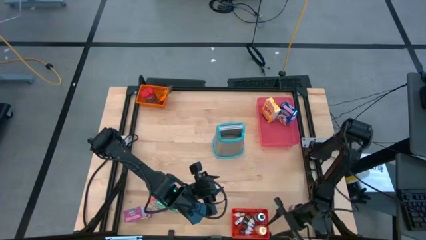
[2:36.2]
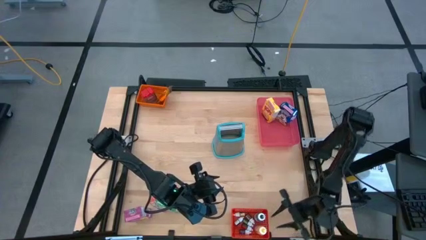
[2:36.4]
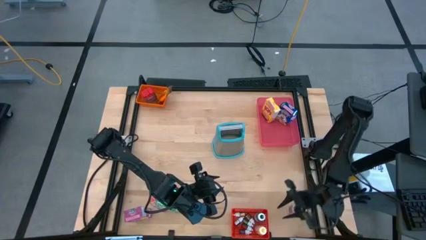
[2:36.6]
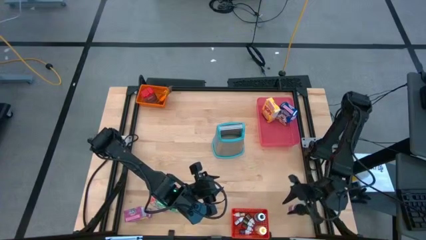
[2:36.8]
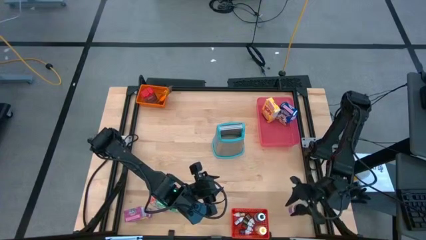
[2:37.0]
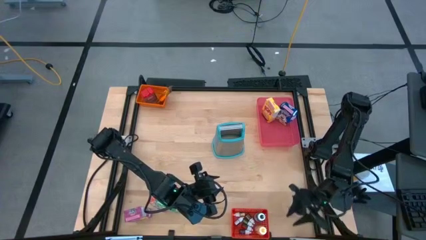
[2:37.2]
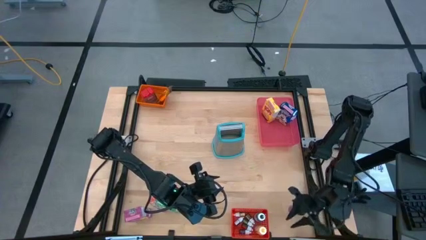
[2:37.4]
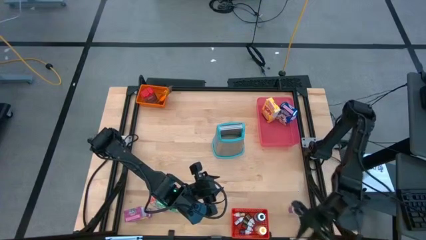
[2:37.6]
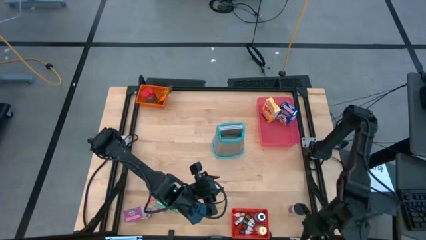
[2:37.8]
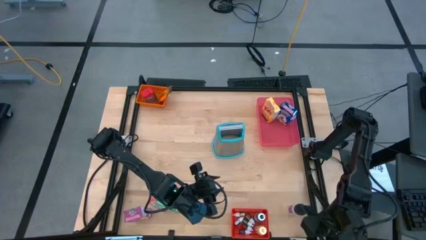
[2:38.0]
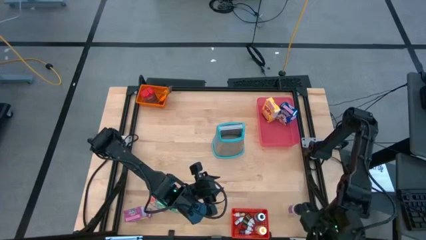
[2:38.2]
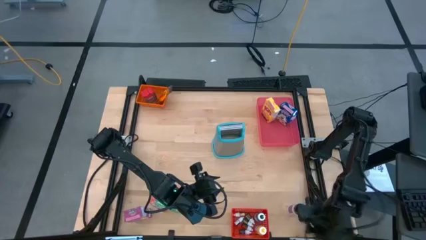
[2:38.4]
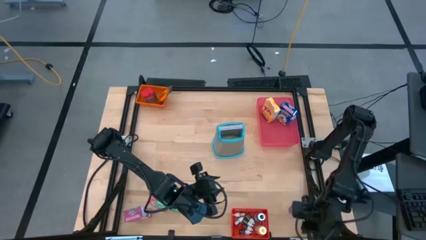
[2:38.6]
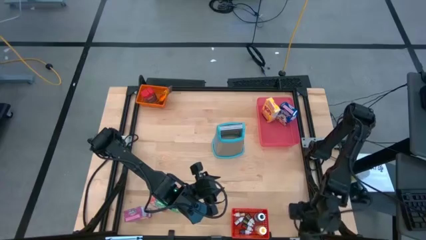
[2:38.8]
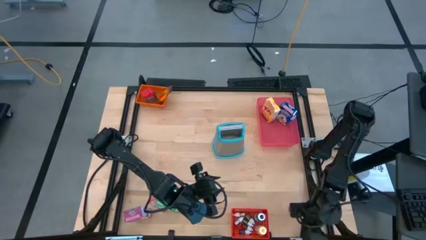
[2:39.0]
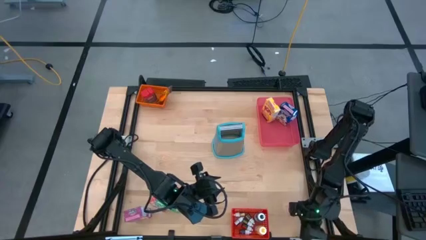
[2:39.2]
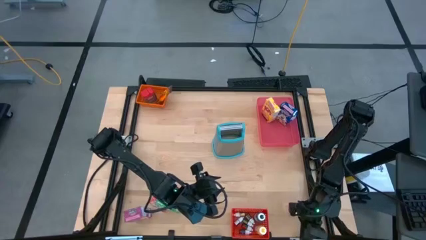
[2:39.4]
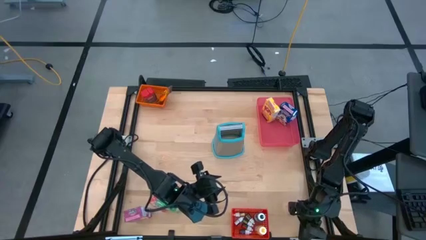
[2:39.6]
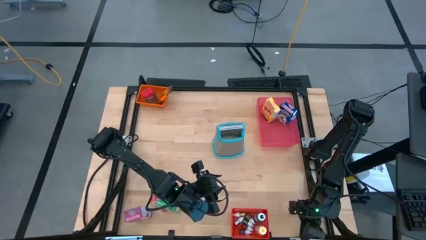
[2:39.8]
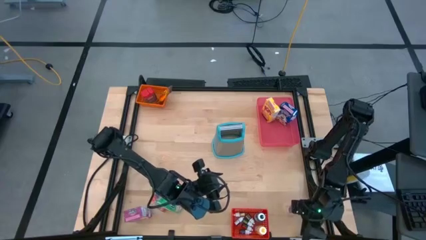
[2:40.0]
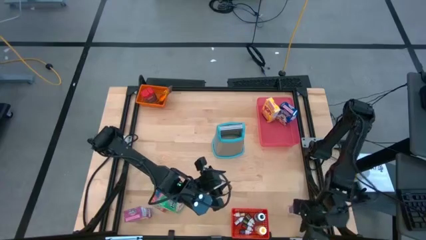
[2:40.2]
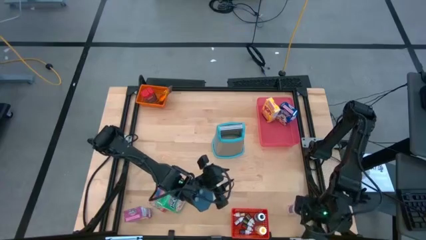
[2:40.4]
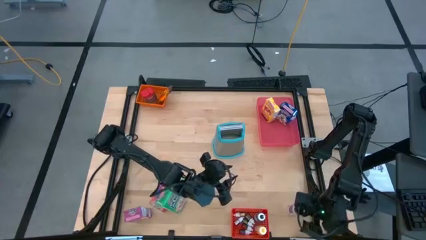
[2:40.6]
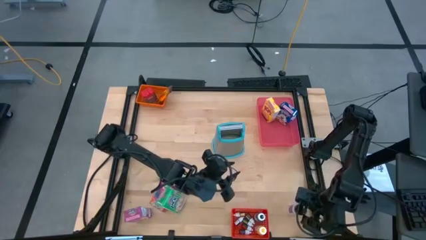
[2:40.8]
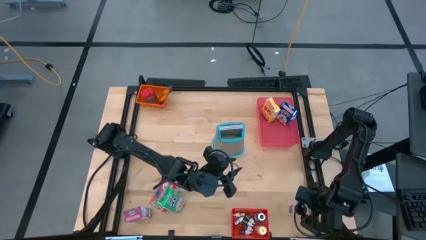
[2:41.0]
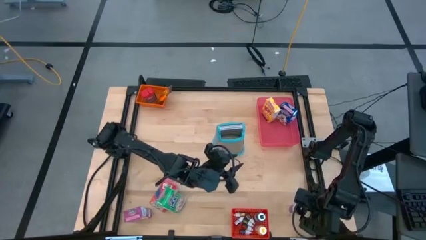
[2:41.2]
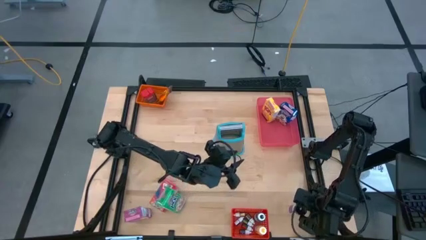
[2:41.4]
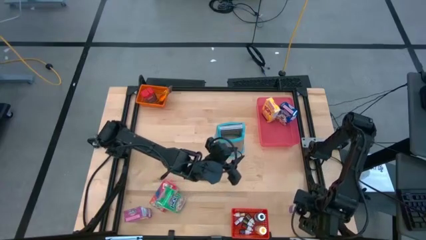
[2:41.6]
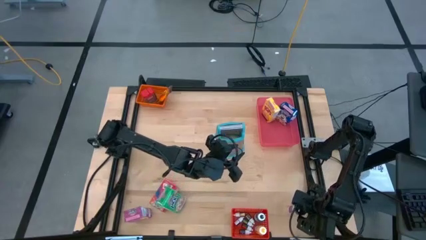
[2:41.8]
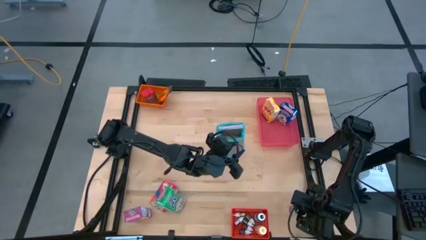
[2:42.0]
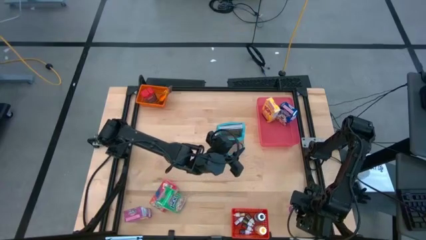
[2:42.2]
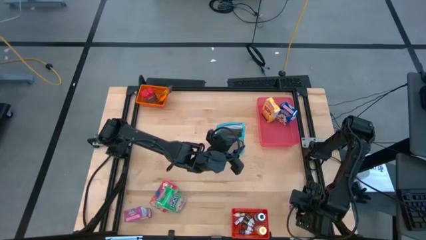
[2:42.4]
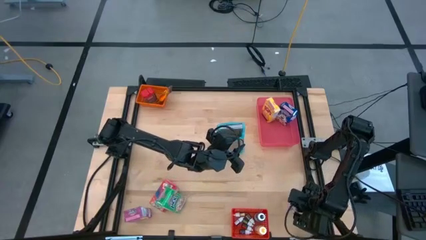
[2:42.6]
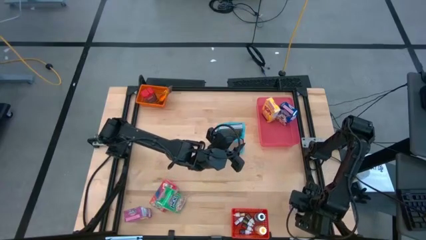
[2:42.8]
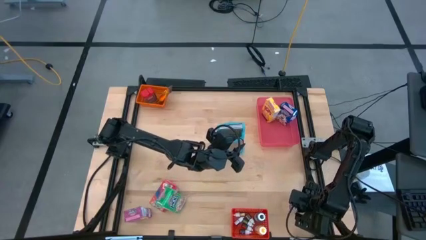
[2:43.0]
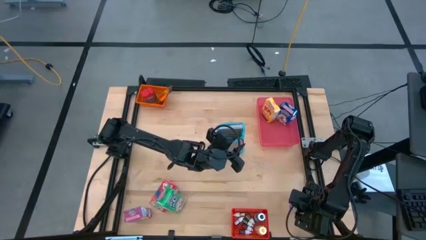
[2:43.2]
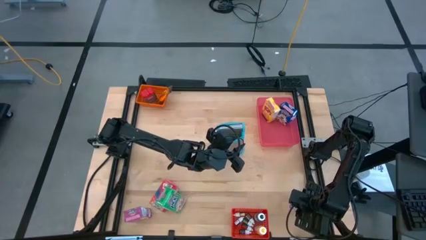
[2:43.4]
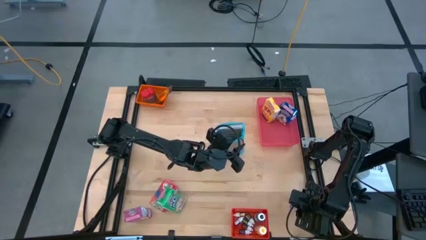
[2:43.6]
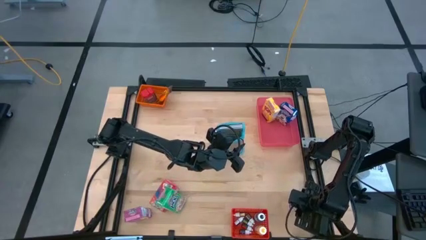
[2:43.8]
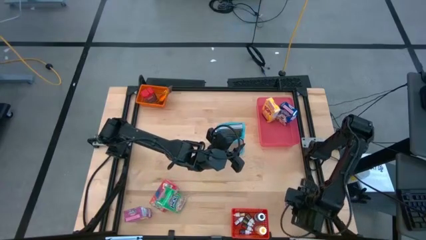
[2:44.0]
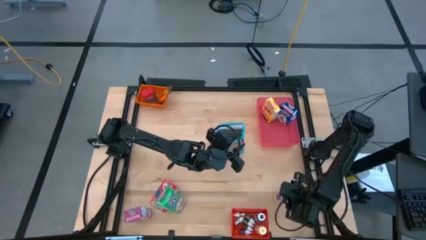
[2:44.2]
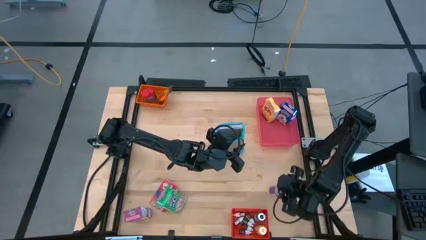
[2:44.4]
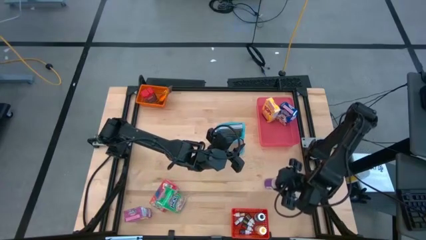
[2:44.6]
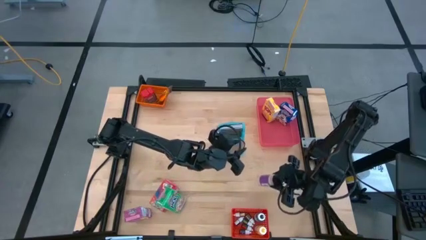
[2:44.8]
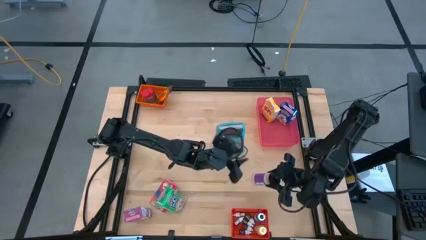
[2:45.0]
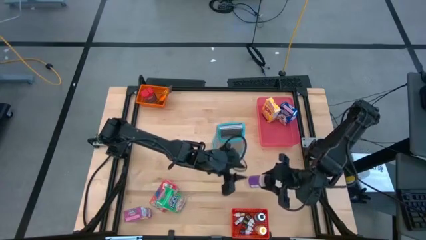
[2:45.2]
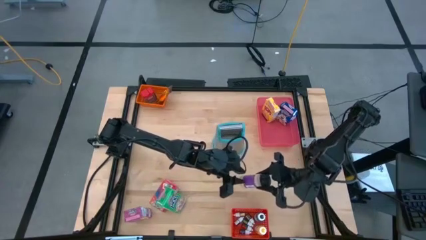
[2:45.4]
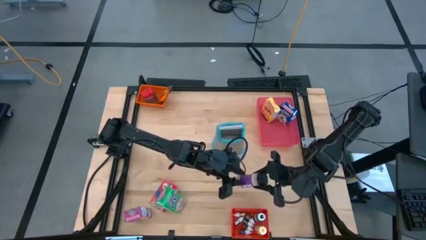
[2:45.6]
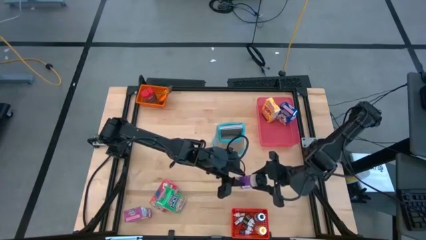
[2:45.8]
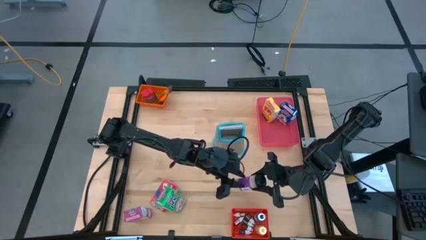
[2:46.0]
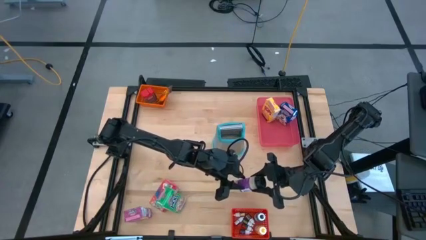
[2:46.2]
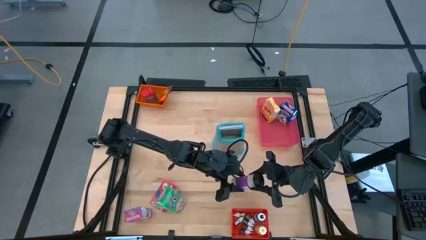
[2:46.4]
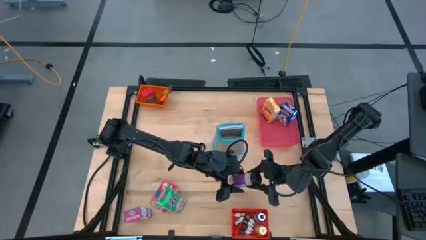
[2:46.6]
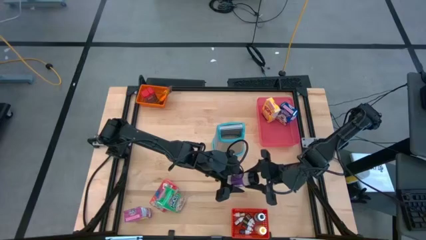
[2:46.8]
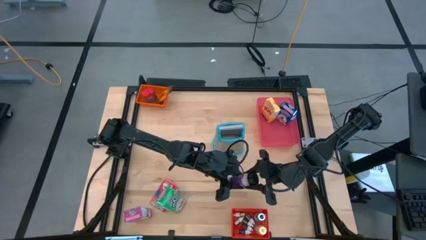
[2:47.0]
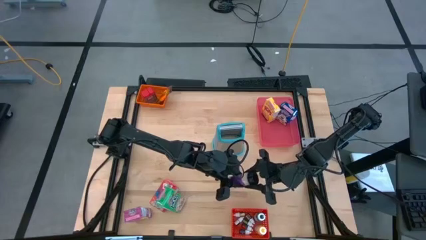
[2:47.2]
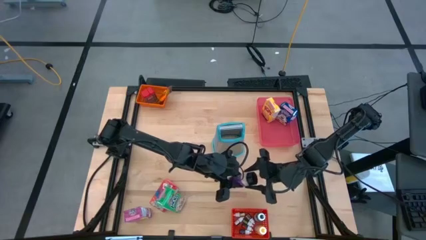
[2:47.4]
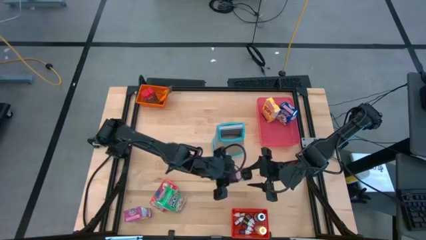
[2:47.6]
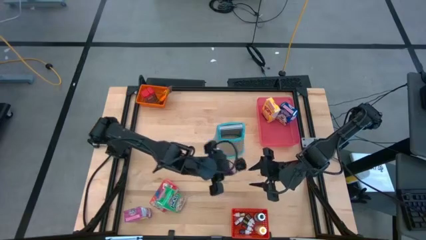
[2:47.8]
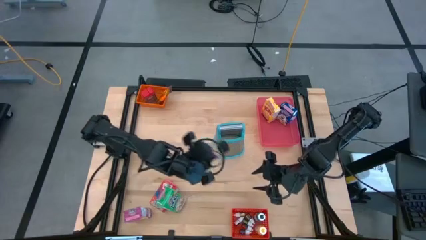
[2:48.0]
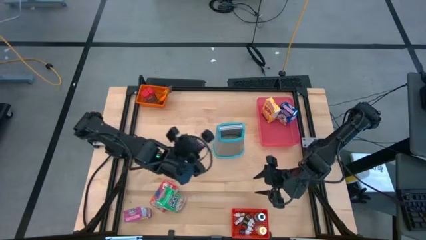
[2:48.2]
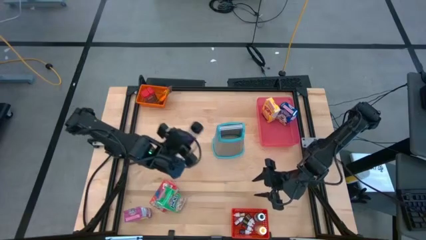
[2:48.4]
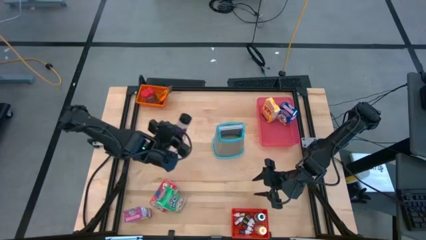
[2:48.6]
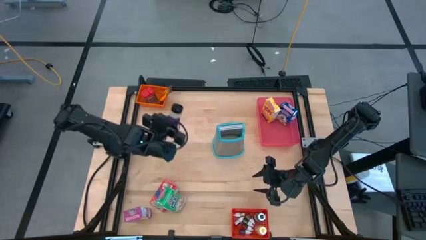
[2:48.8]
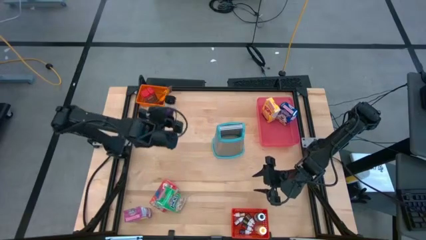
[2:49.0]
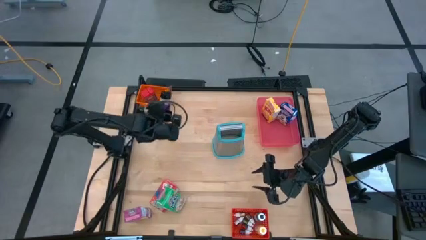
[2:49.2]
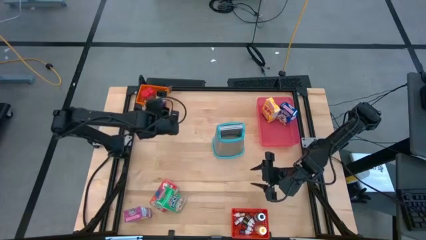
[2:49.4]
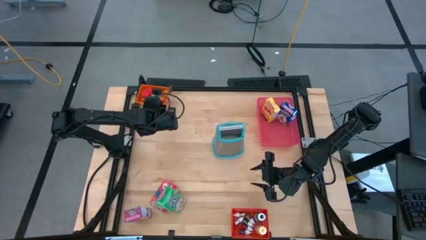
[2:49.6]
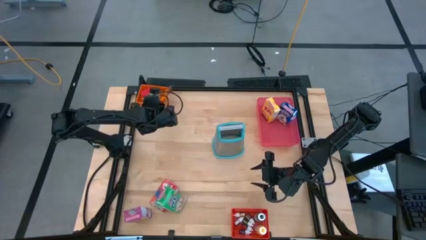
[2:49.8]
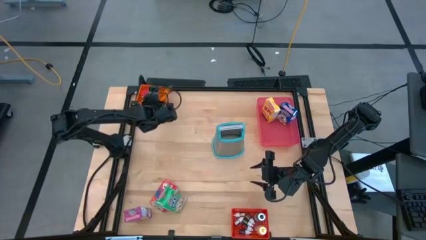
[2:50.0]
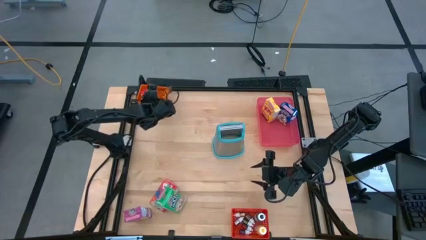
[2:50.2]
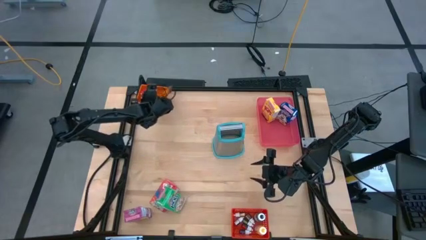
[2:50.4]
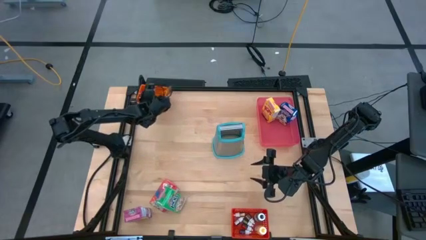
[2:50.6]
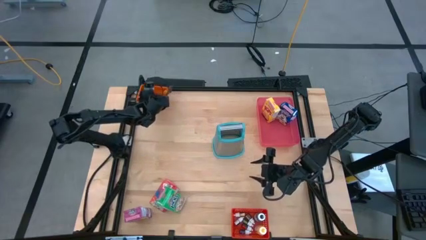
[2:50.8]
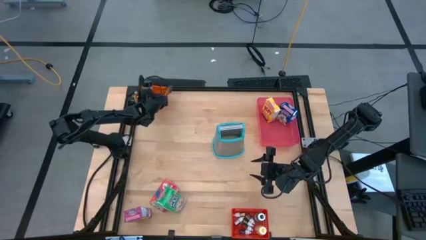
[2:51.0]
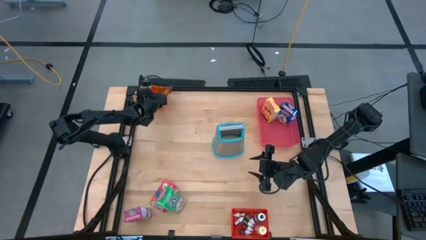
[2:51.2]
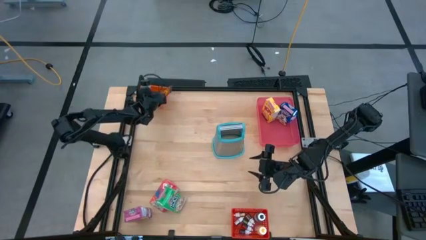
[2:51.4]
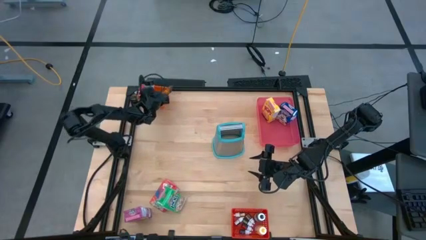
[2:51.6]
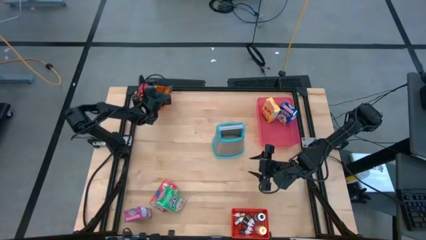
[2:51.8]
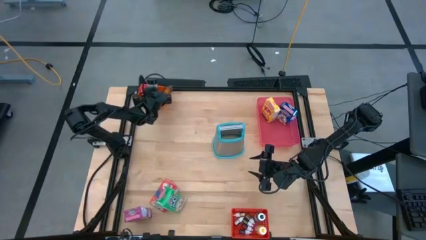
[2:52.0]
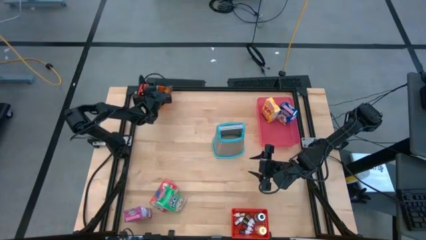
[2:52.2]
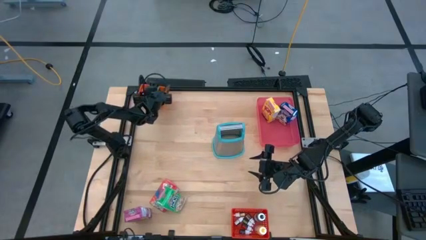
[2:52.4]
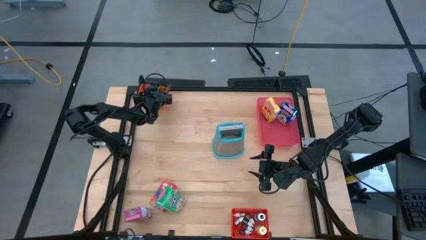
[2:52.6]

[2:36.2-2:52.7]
Task: Pick & Place Kitchen Items
Put the purple seasoning bottle into the orange bin

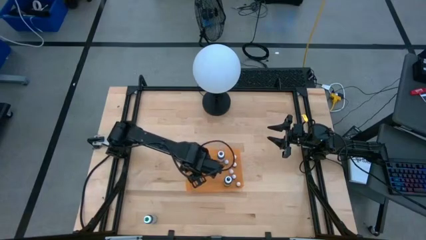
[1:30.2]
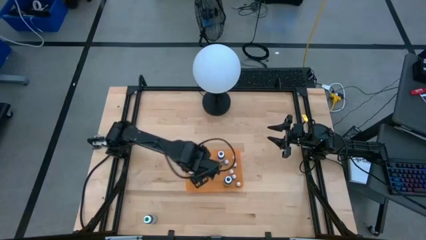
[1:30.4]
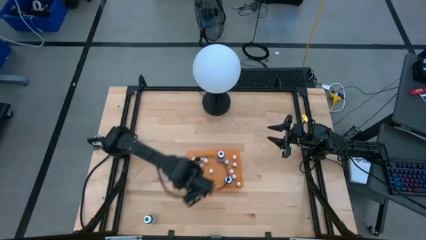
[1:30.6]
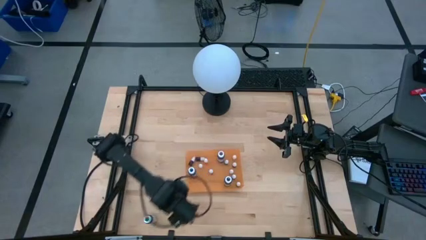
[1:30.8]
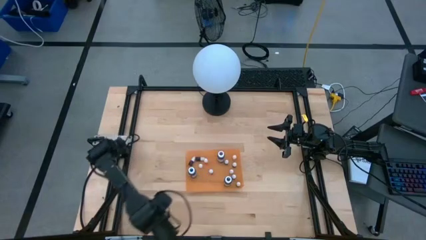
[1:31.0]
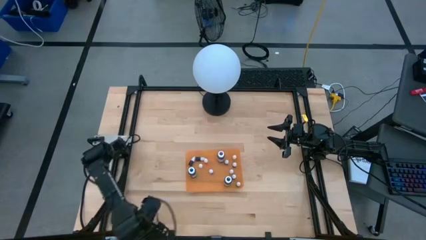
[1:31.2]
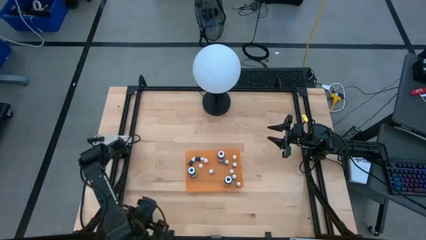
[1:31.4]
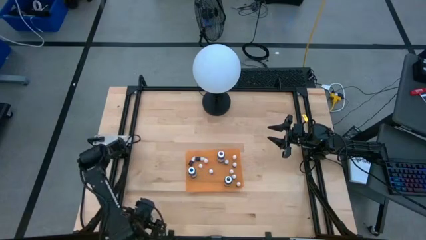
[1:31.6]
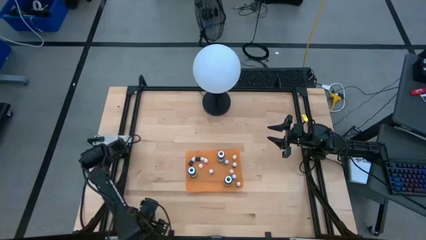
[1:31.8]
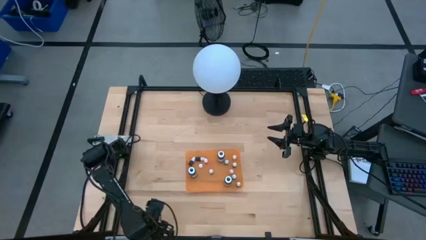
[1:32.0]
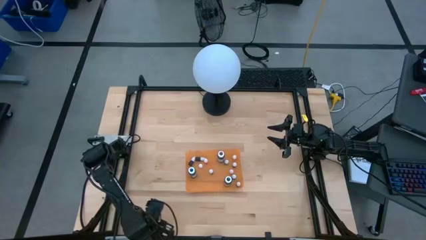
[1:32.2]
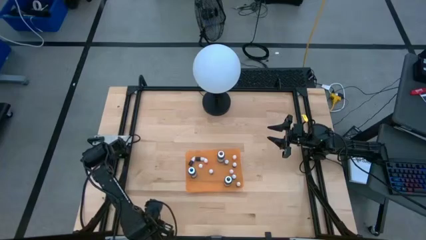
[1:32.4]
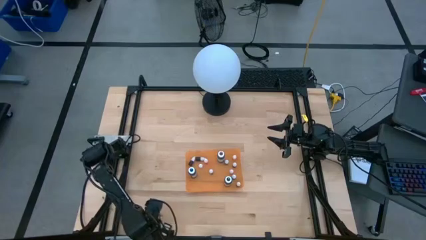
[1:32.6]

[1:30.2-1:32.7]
Task: Pick & Place food coloring
Put the large green food coloring bottle into the orange container
